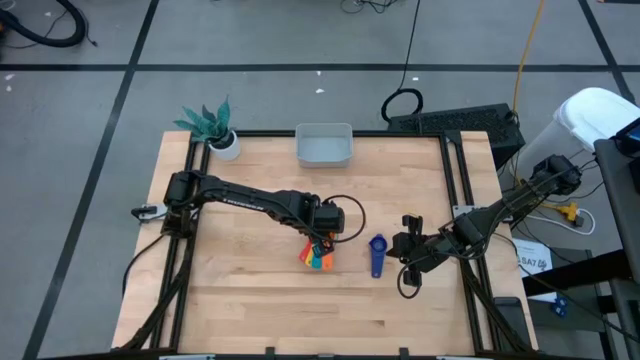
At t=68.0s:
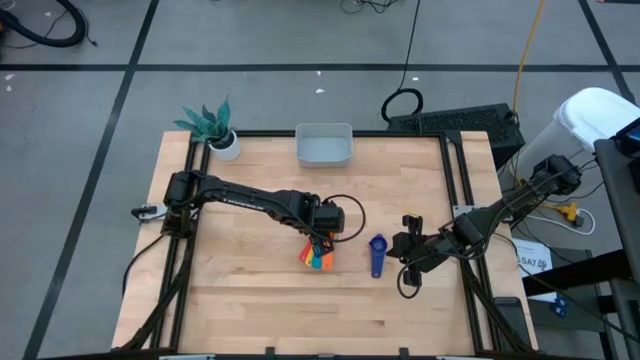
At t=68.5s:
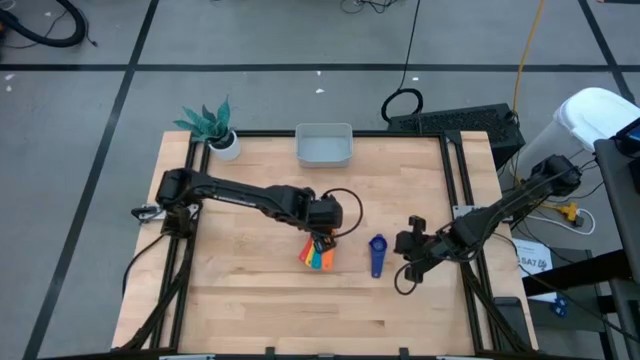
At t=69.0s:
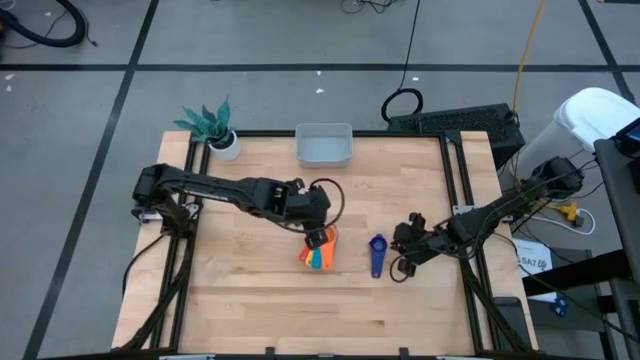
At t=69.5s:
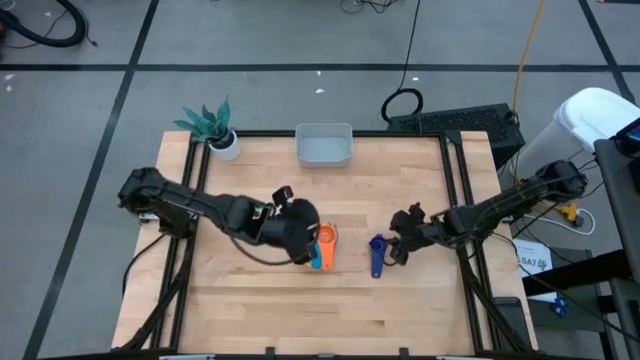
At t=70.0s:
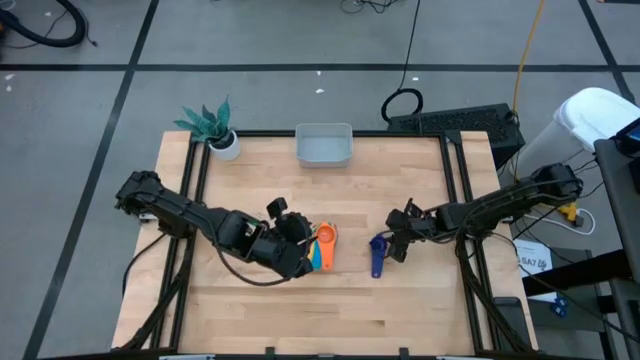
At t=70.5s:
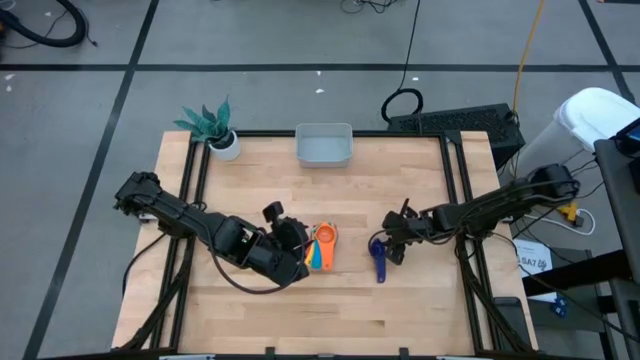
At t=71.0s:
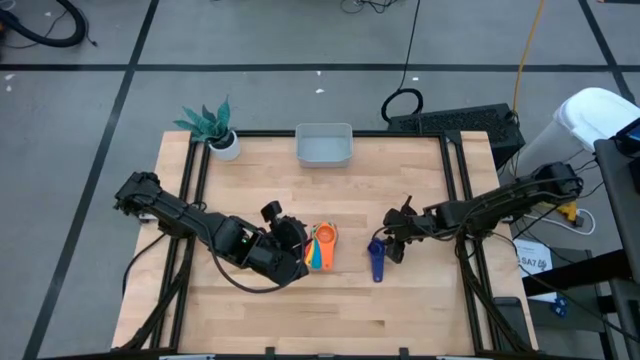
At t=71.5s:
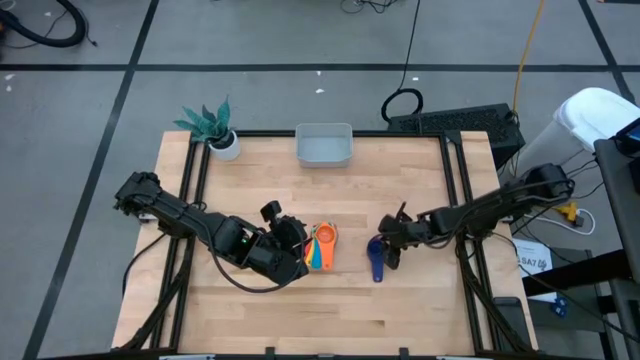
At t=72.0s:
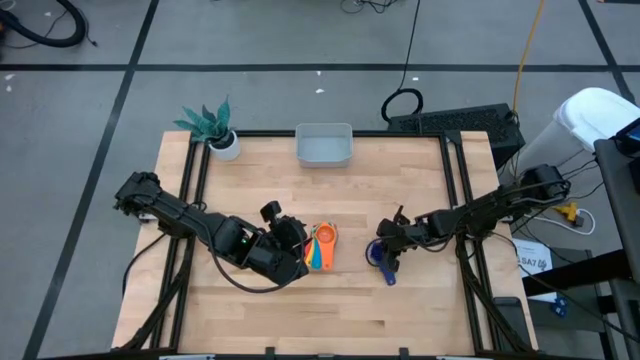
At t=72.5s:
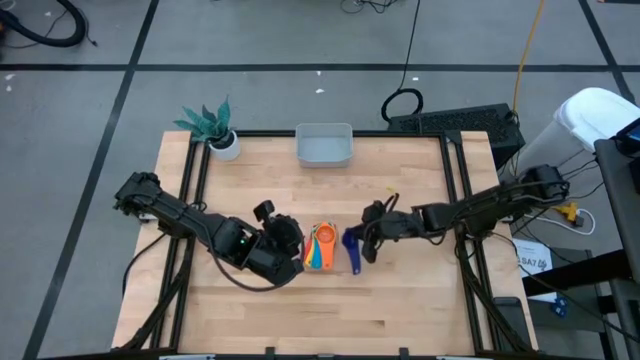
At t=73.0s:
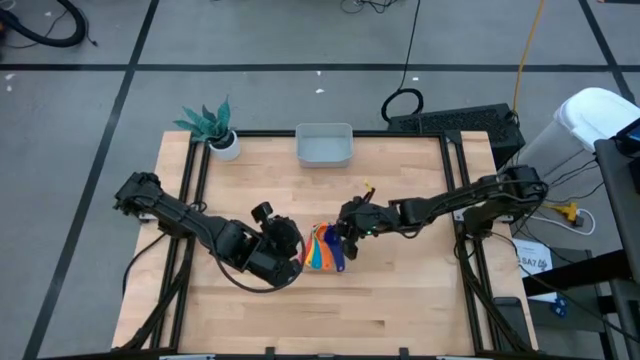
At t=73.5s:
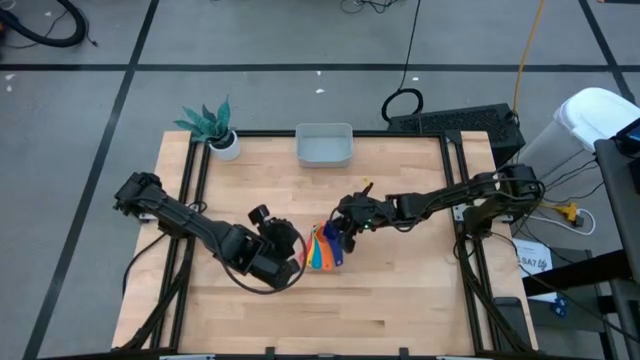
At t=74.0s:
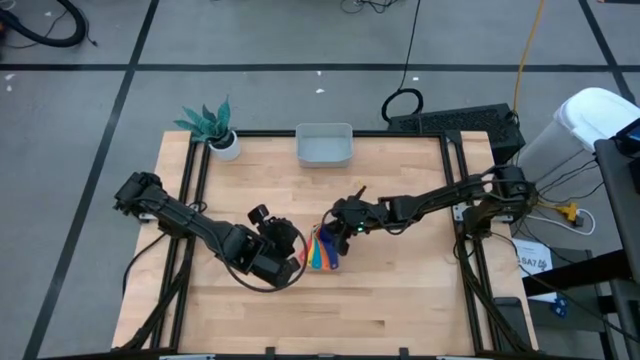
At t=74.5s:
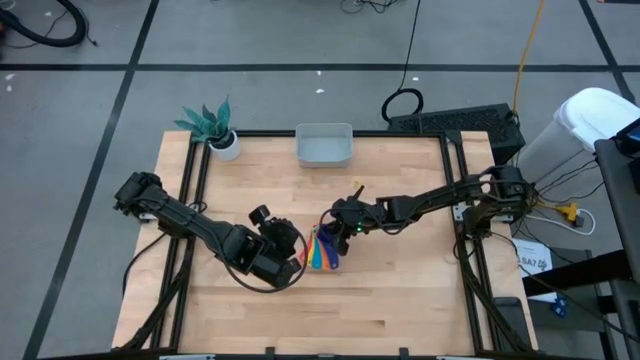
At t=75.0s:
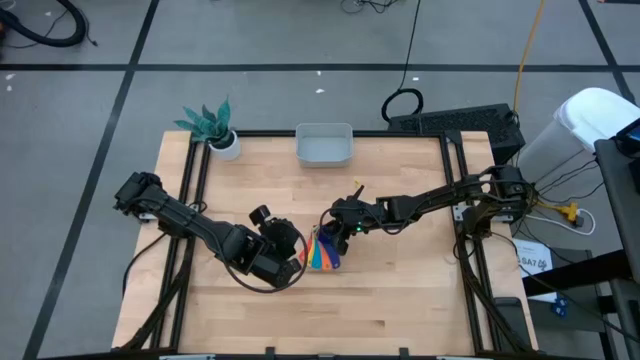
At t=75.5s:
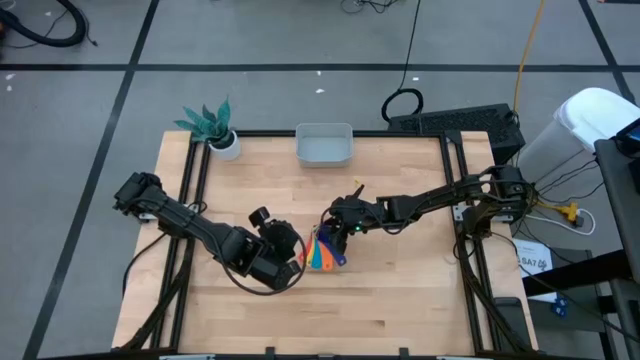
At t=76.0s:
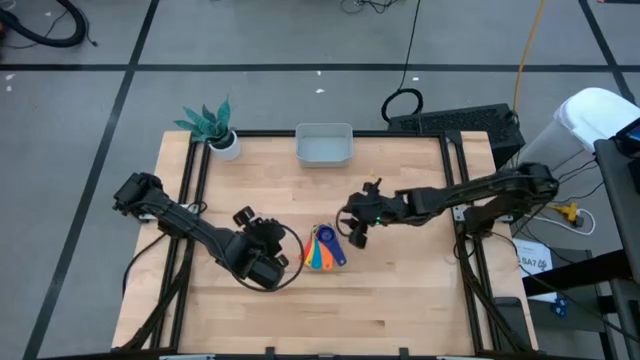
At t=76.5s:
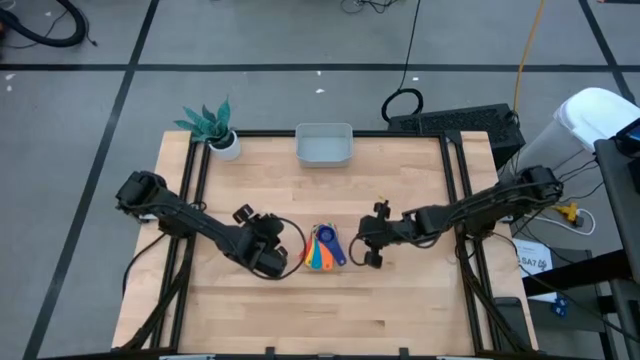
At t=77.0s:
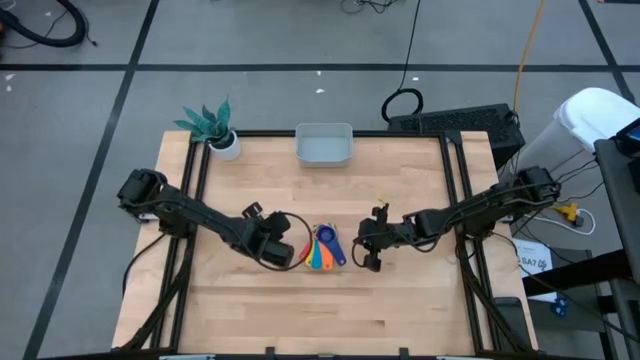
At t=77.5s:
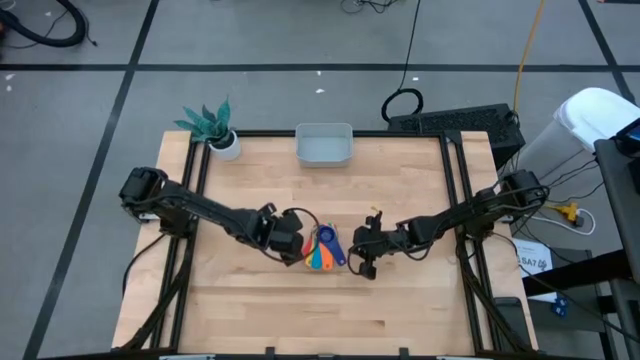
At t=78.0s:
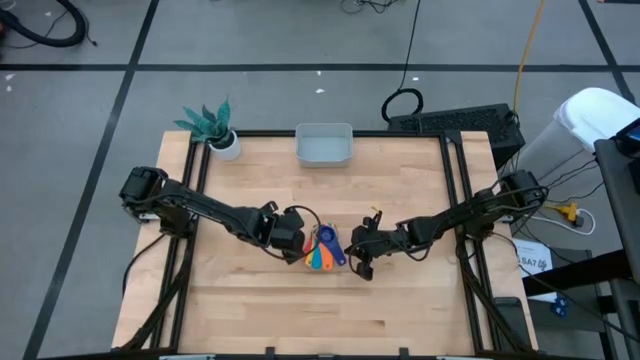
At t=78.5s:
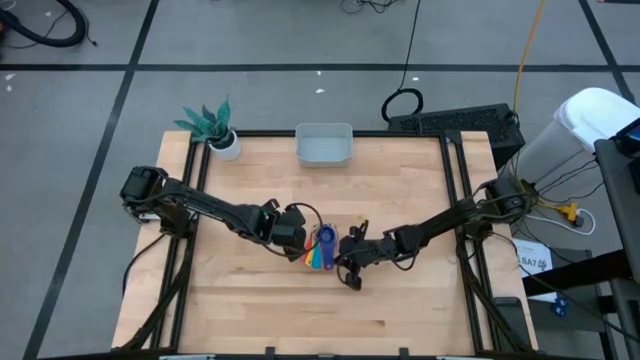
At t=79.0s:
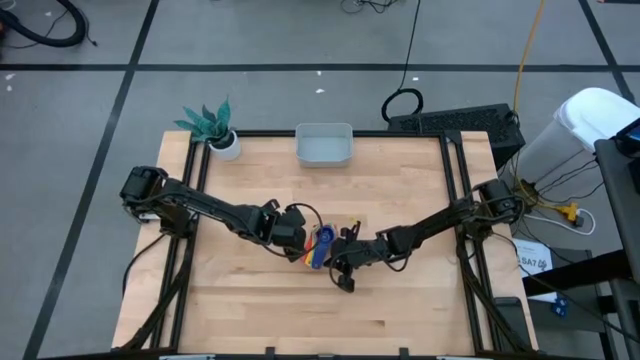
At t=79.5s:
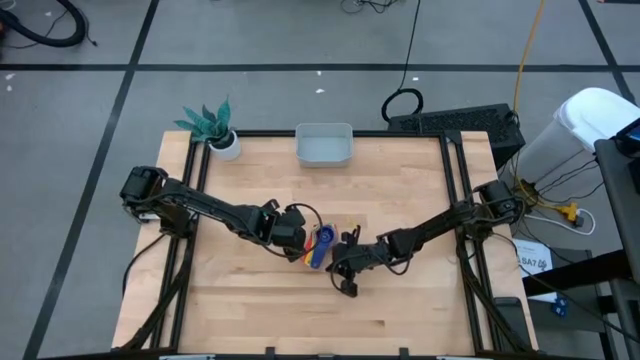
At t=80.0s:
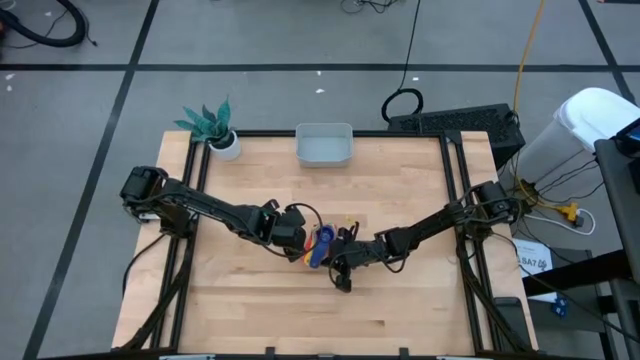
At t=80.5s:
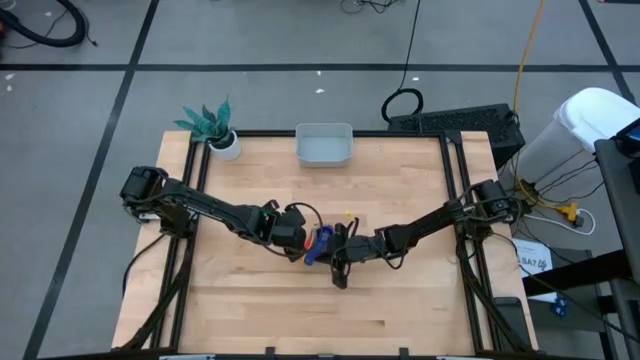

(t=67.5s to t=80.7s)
Task: Nest measuring cups in basket
Stack the dark blue measuring cup on top of the orange measuring cup

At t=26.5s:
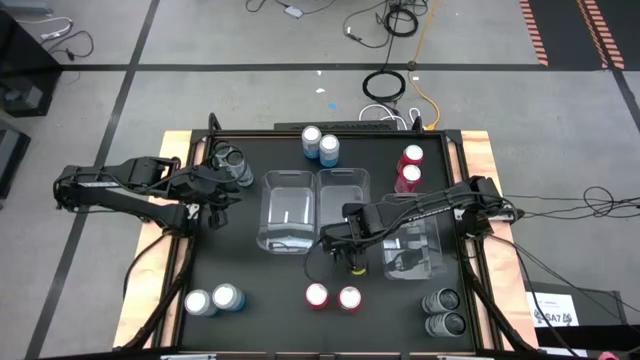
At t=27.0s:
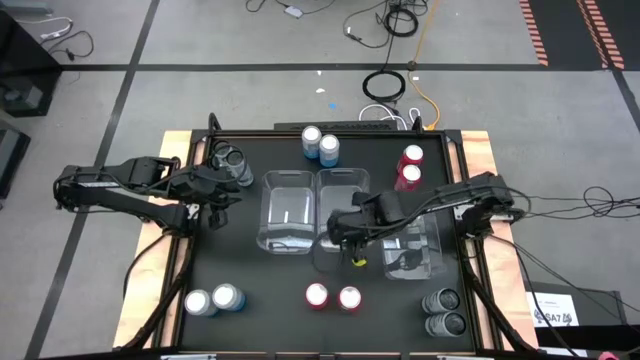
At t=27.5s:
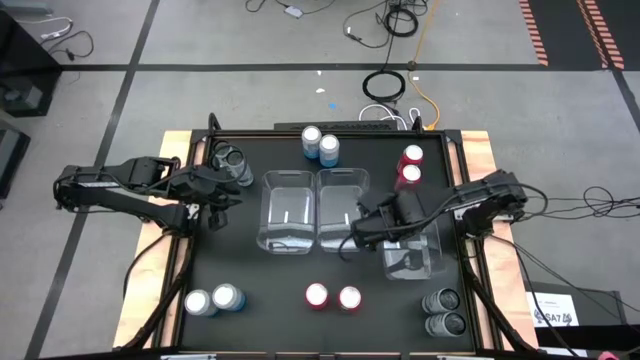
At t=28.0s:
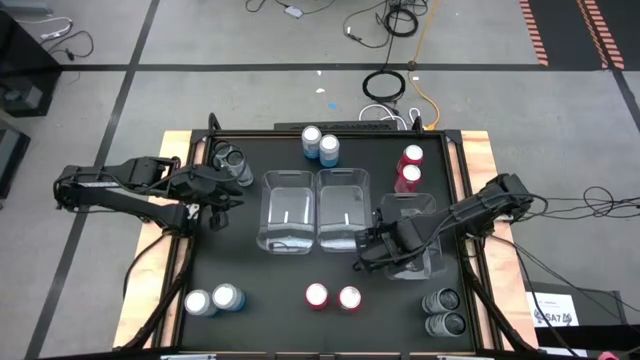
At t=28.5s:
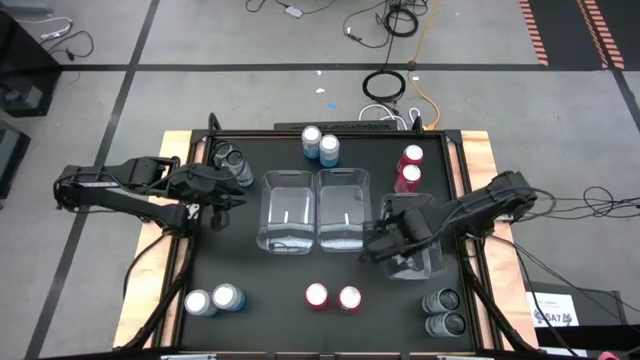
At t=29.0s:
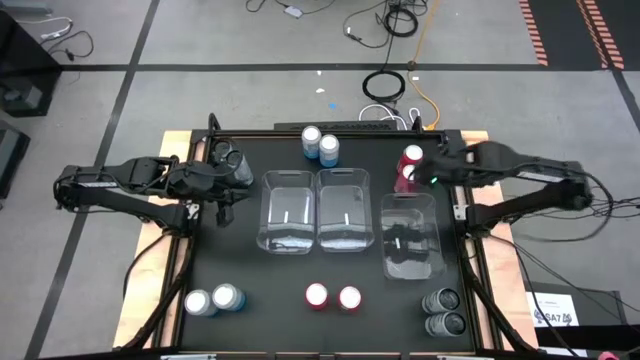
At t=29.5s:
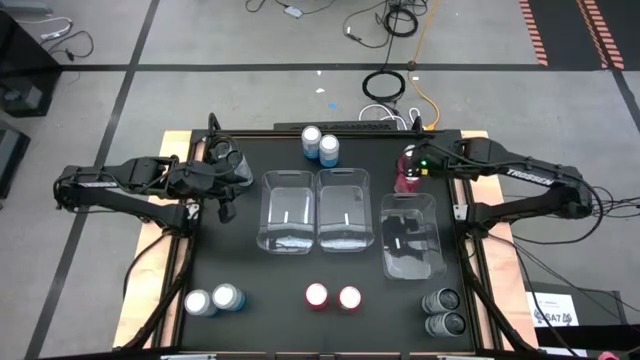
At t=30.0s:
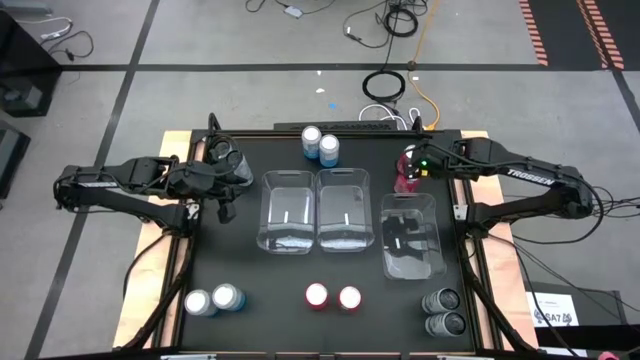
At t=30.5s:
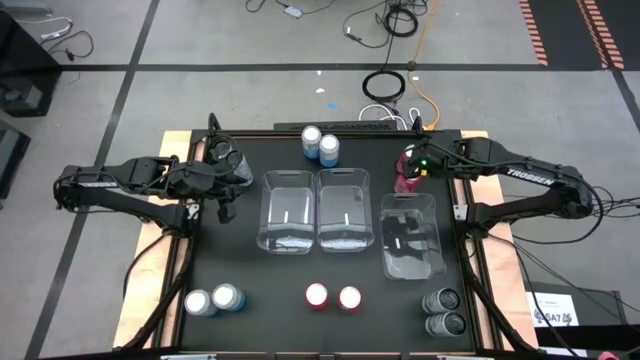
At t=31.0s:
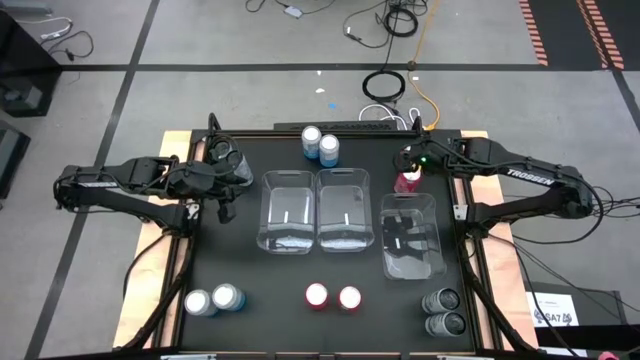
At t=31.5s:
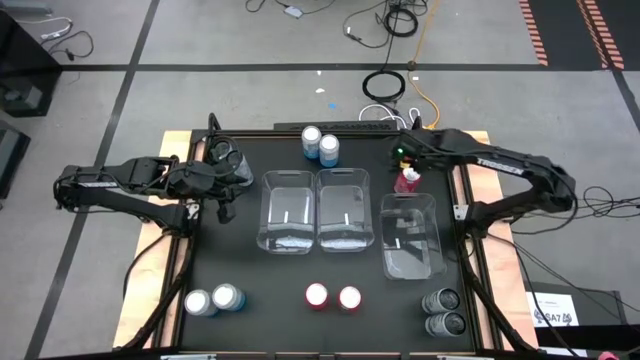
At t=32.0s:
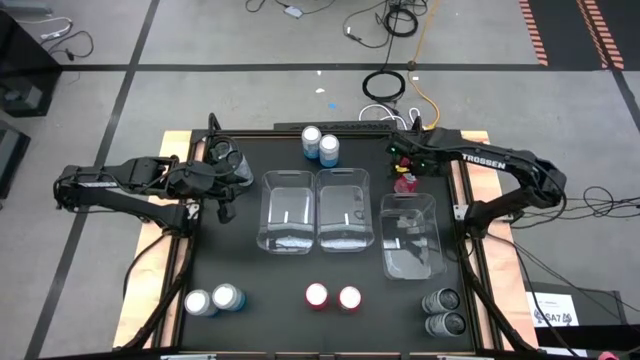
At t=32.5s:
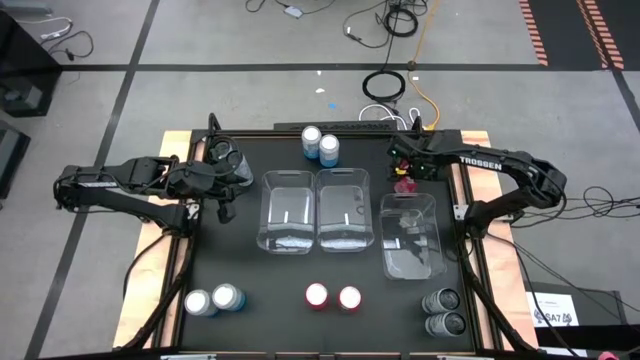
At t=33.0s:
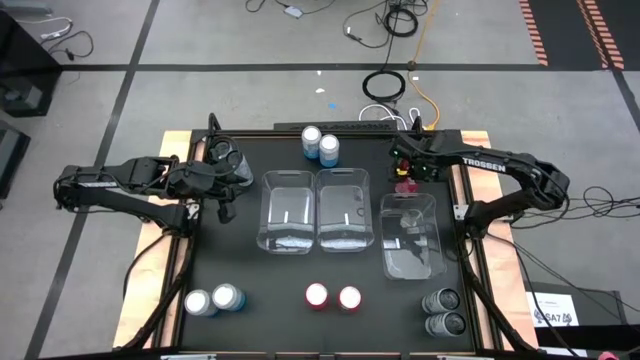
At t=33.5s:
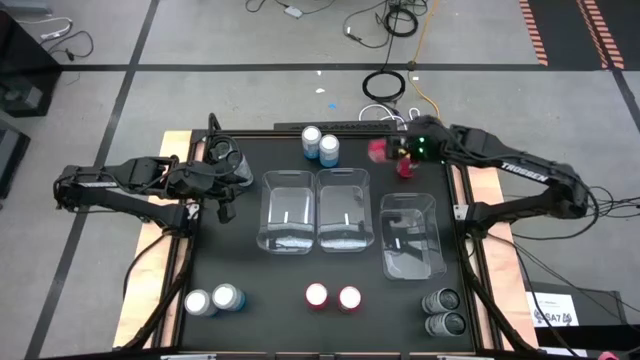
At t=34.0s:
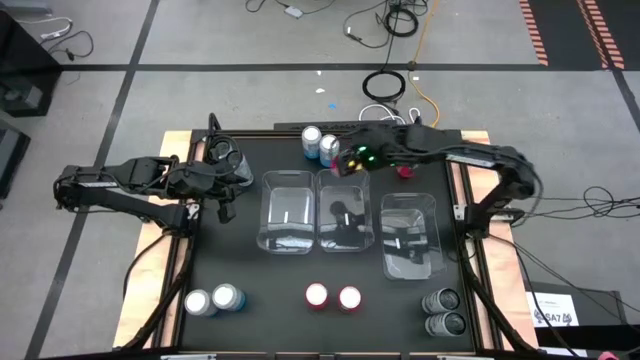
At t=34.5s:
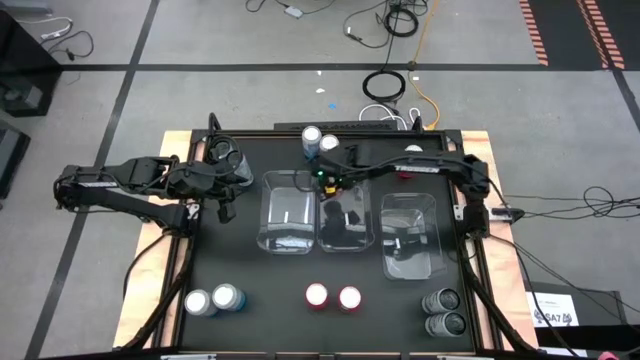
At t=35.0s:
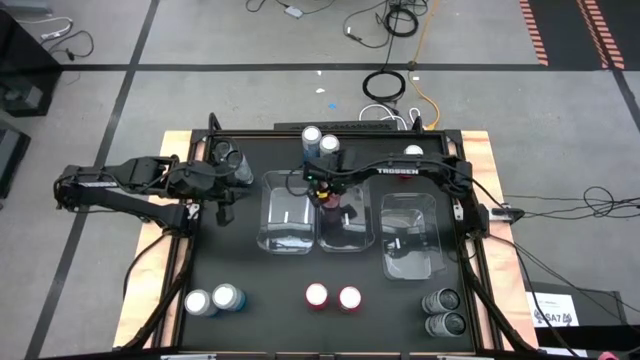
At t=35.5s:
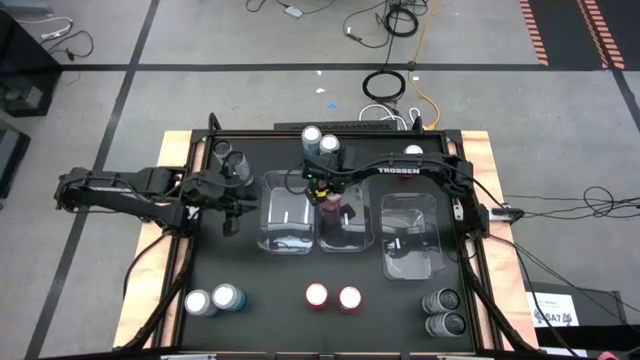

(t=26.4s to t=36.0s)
Task: Sort soda cans
Put the orange soda can into the center transparent bin
